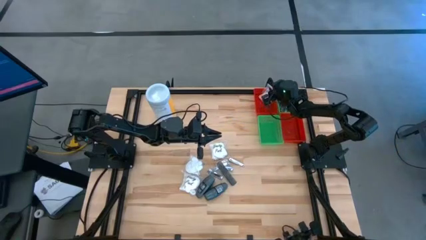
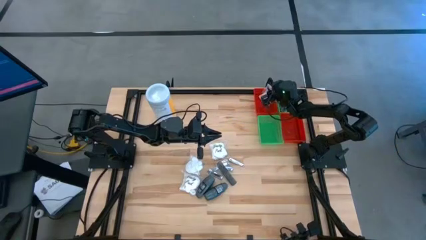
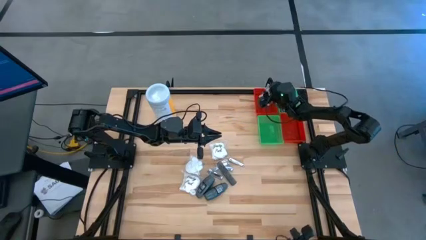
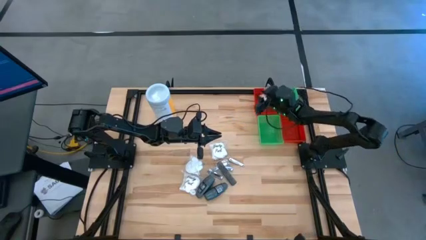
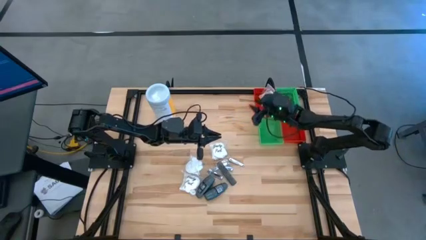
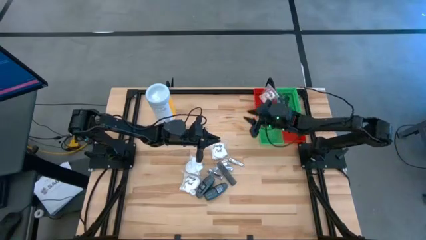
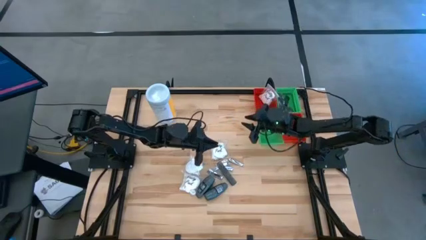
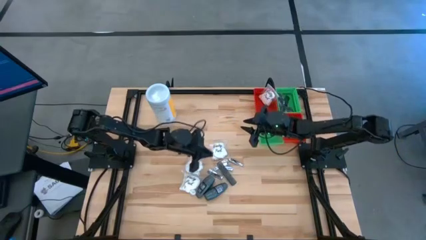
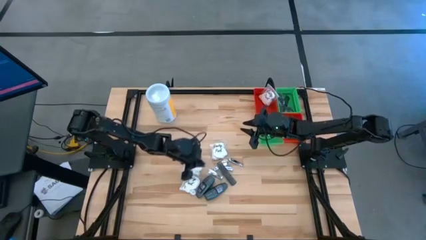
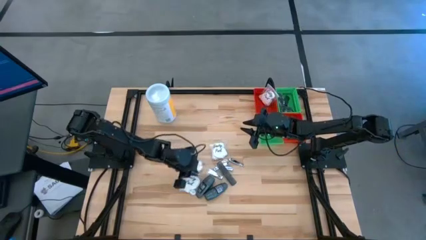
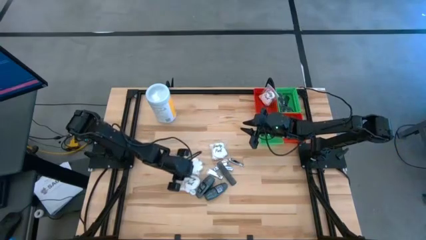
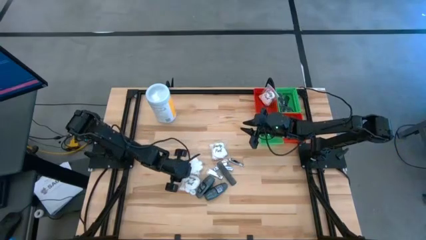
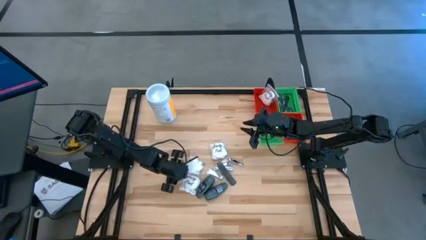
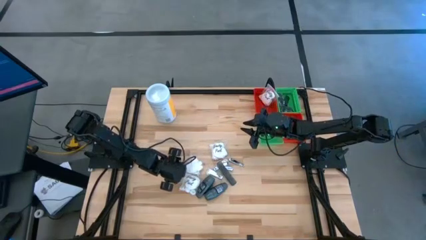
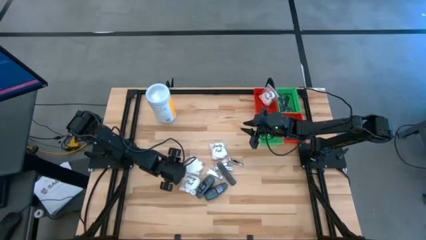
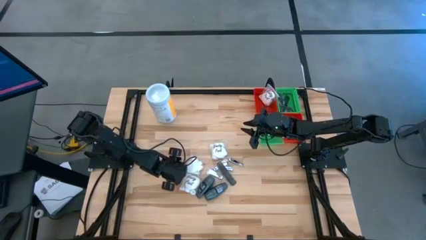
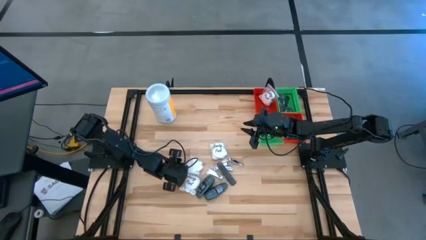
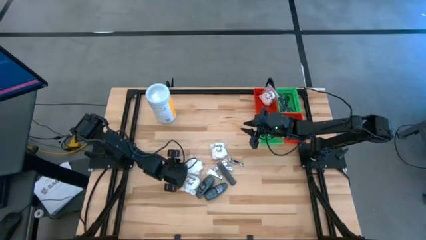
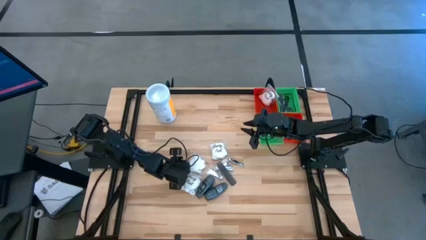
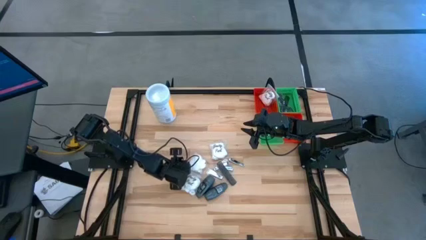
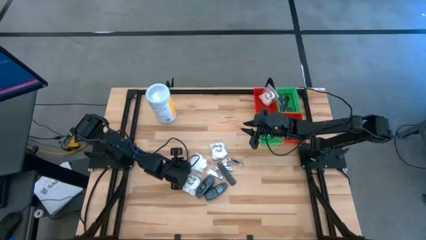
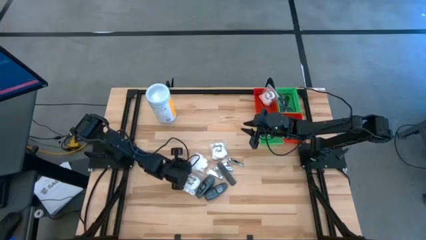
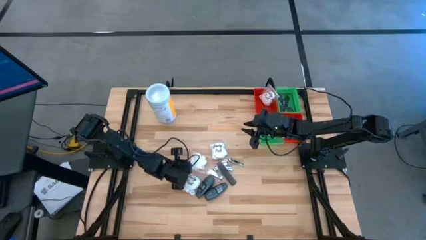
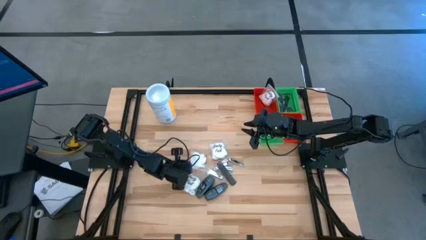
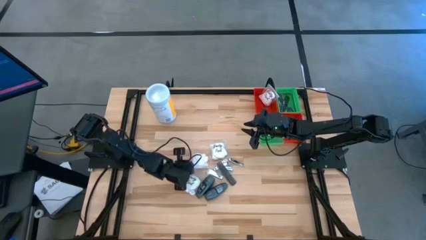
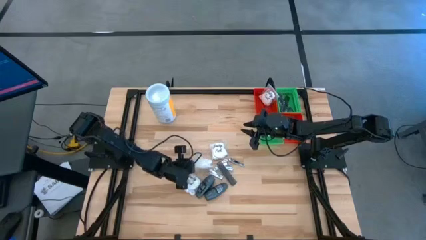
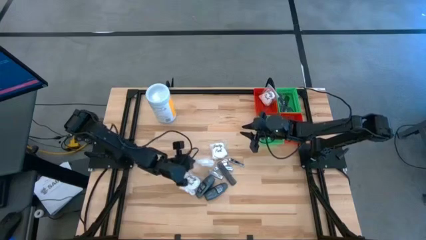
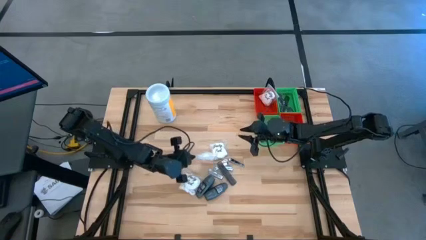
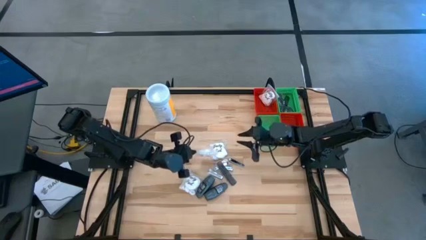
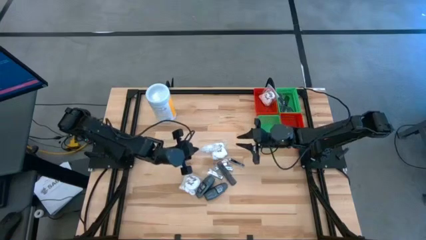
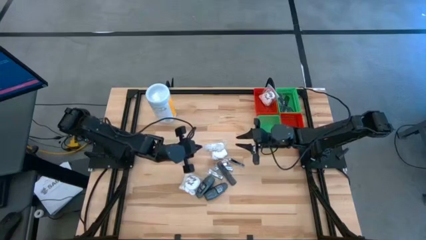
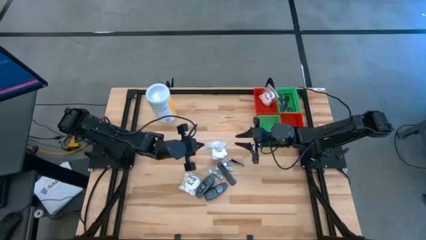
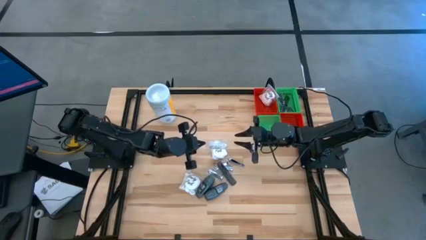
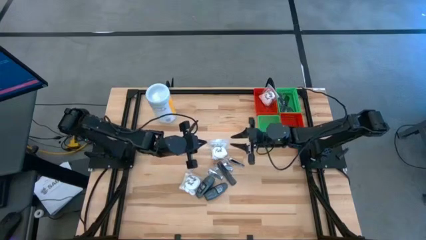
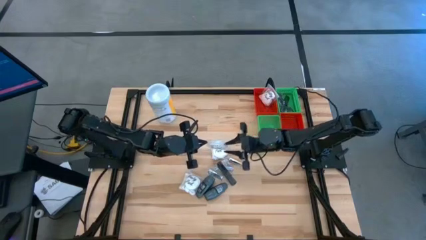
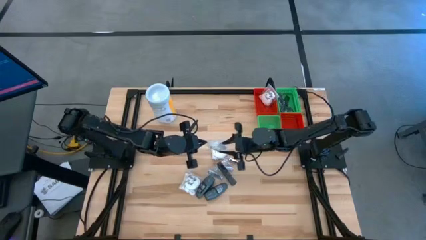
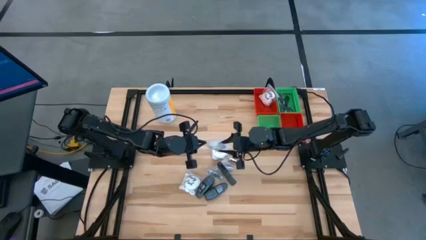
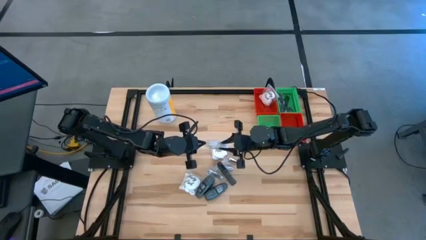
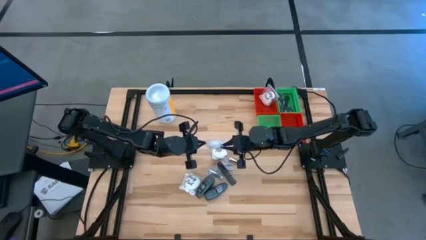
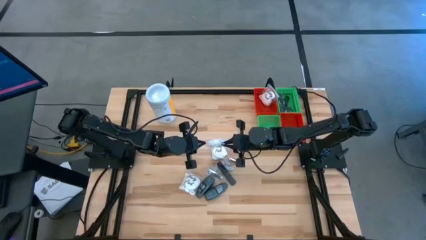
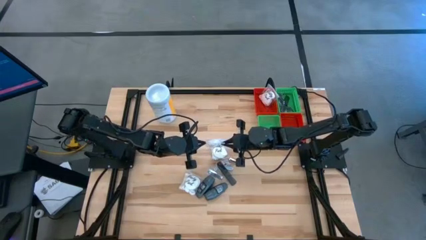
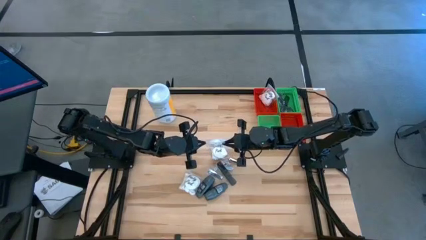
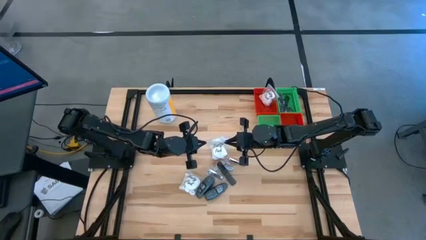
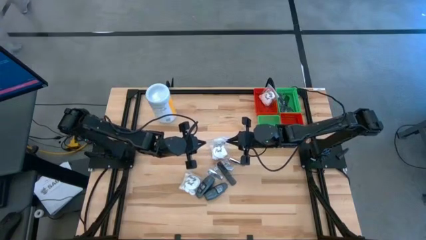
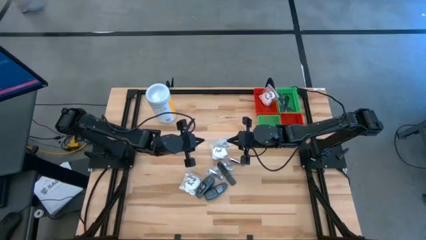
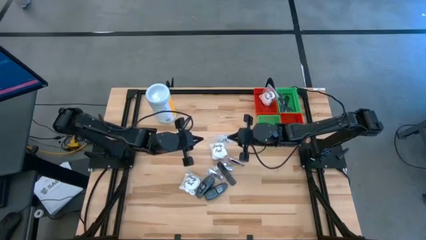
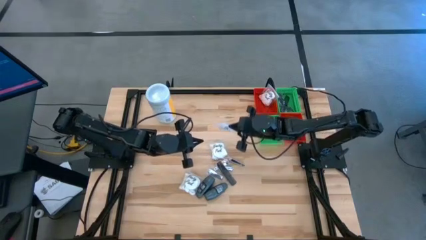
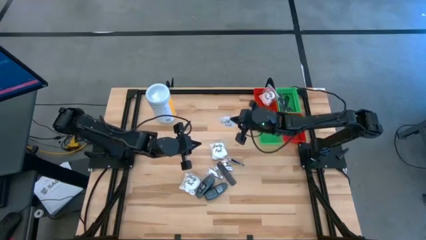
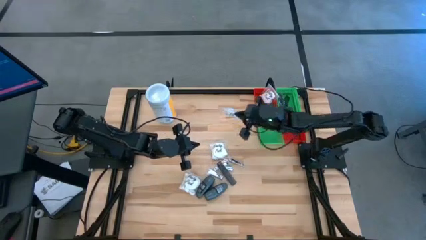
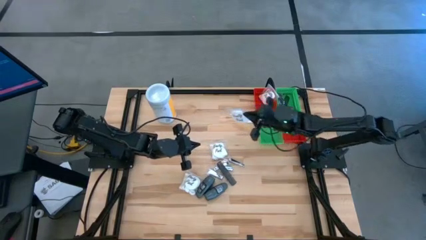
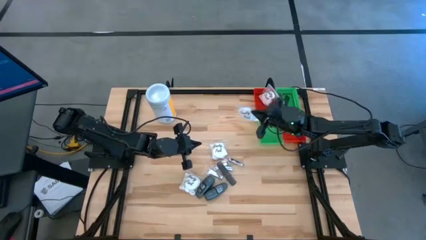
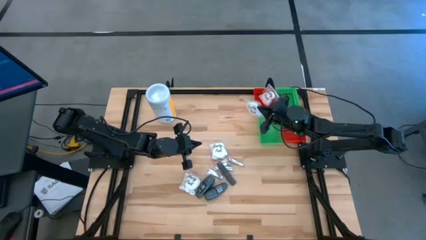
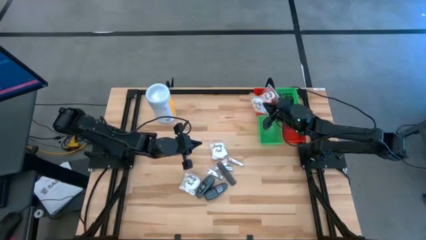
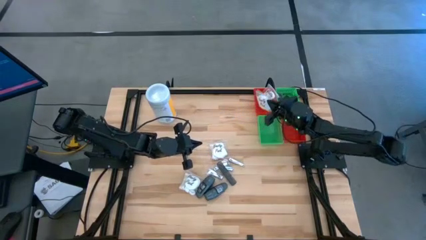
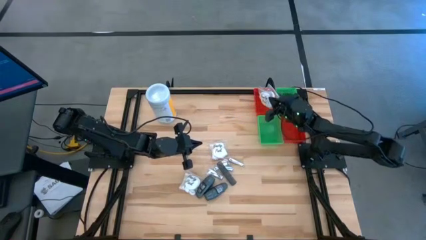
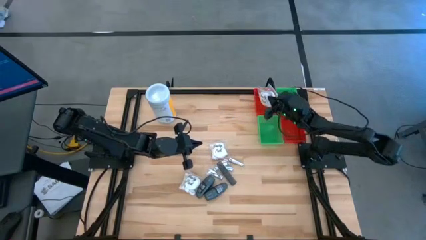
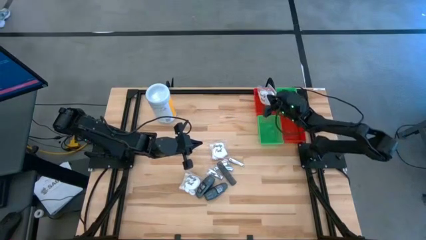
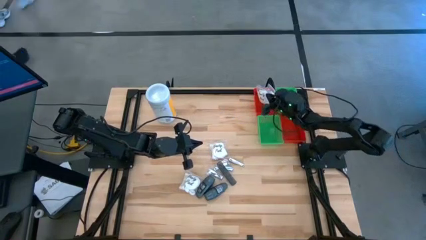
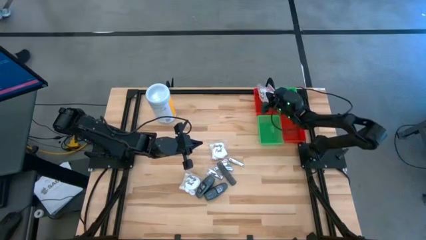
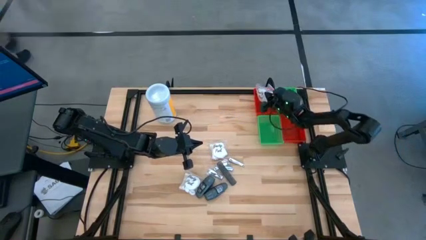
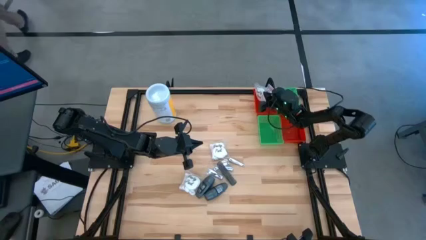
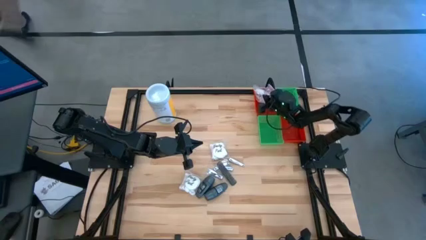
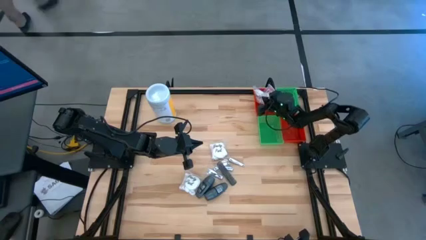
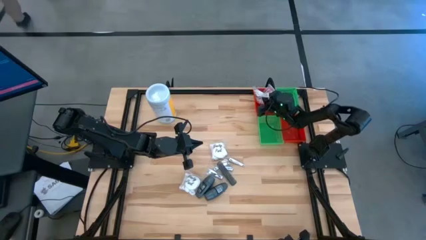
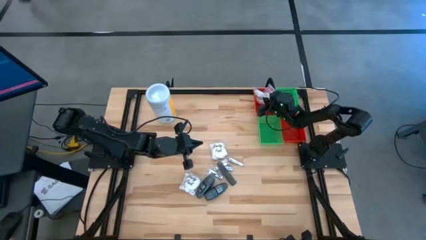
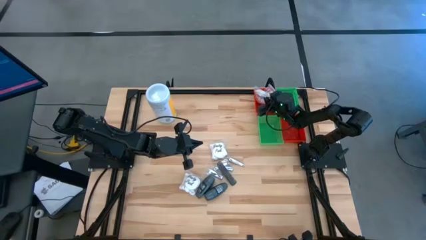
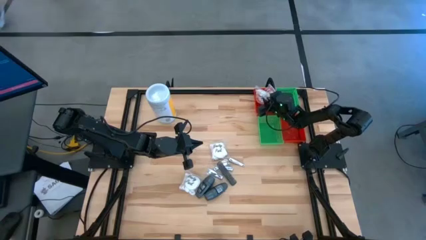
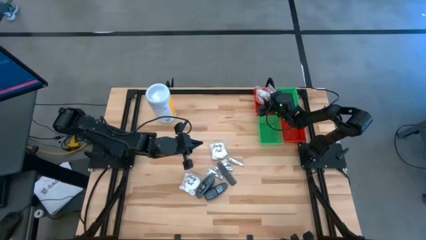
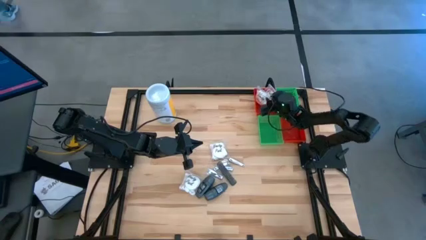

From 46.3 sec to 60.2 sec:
Task: Pick & Place Travel size toiletries
Put the white cotton pack into the top red bin
